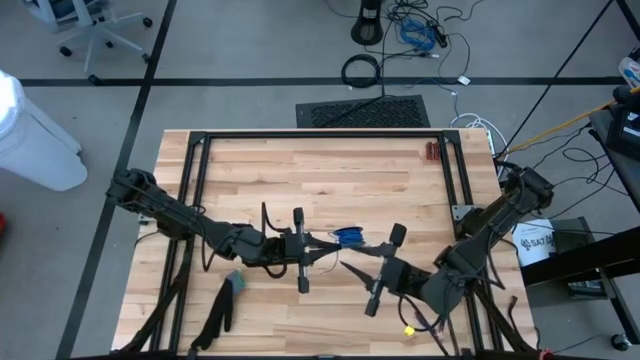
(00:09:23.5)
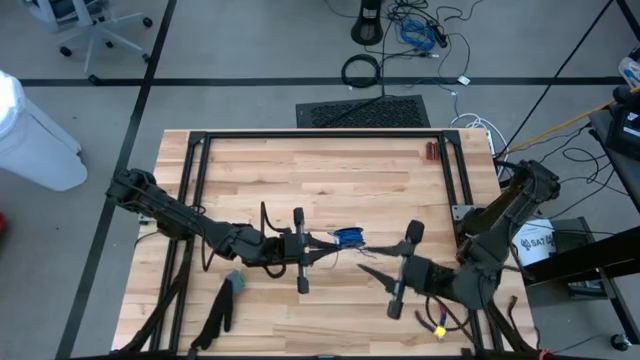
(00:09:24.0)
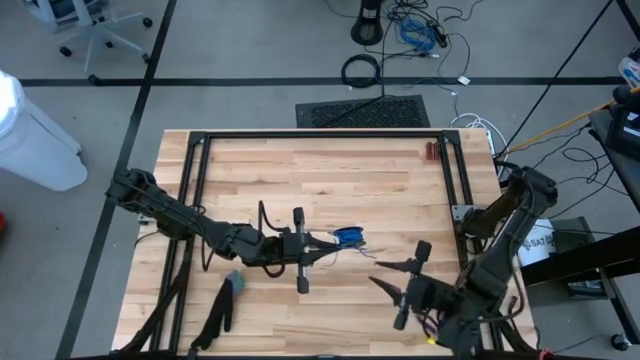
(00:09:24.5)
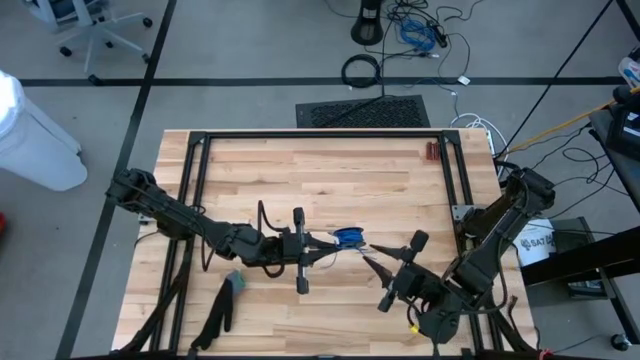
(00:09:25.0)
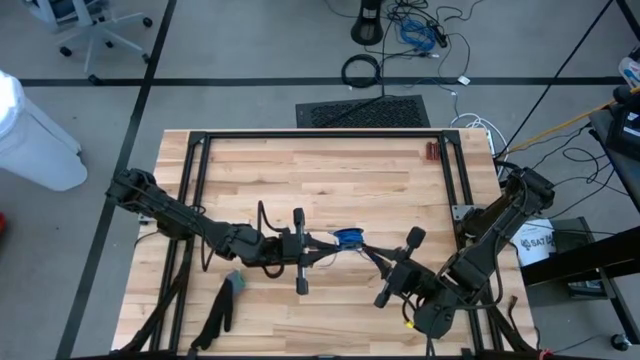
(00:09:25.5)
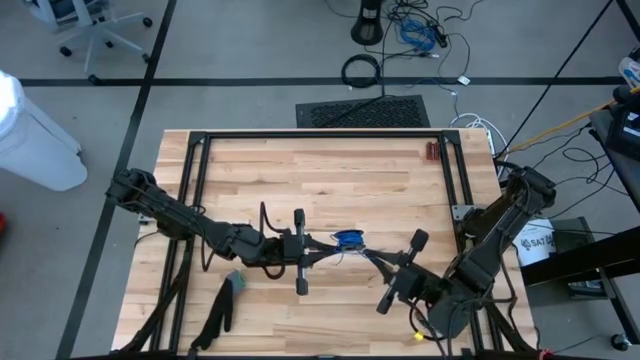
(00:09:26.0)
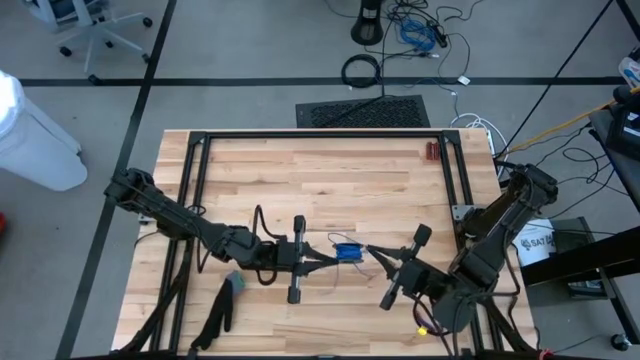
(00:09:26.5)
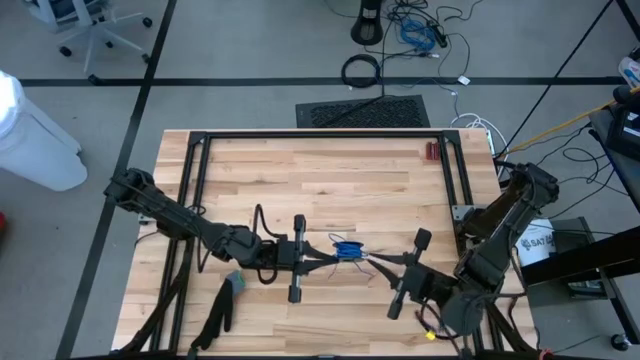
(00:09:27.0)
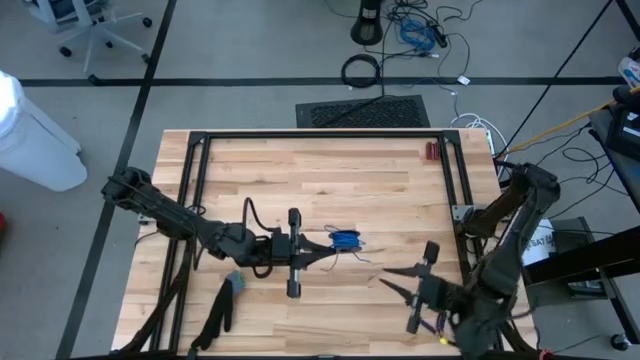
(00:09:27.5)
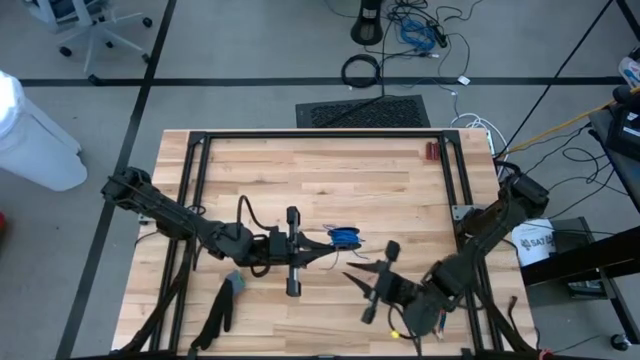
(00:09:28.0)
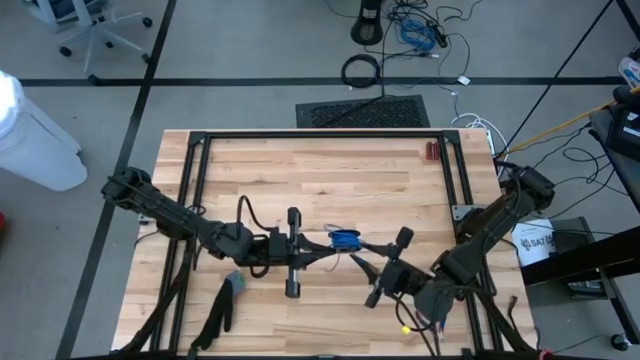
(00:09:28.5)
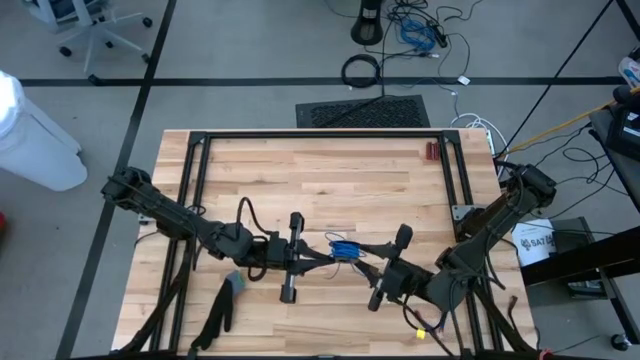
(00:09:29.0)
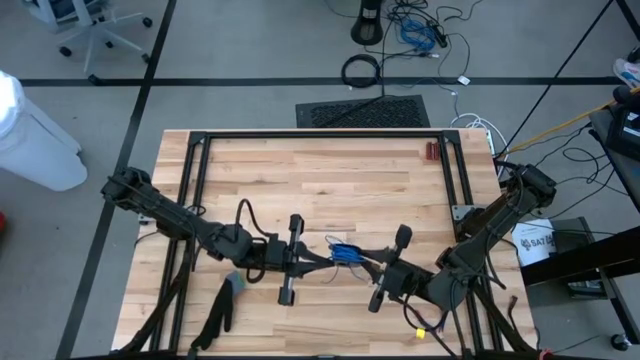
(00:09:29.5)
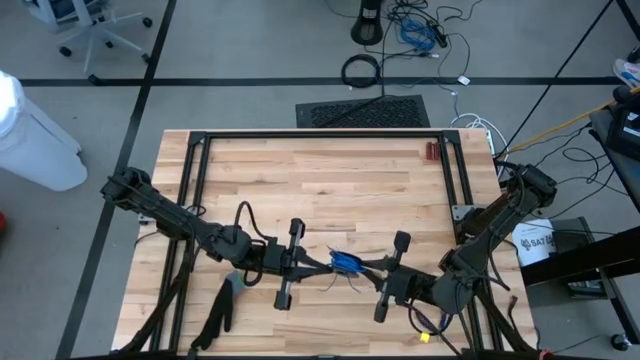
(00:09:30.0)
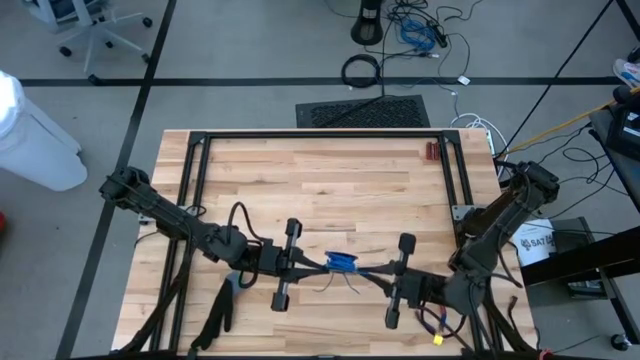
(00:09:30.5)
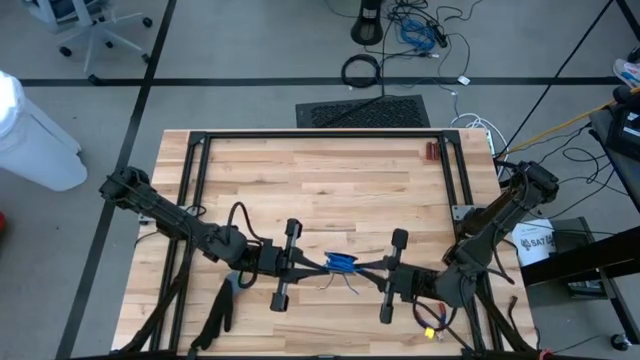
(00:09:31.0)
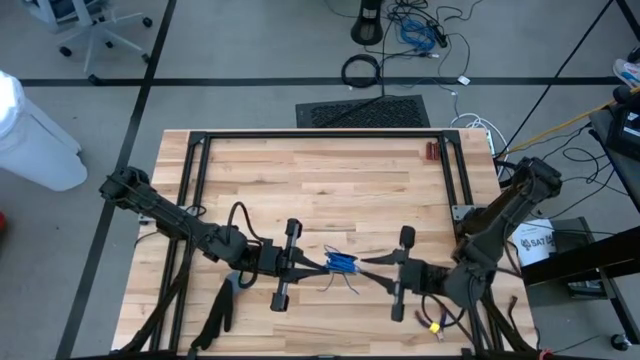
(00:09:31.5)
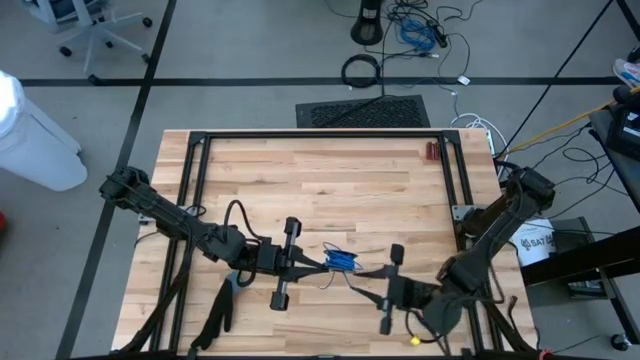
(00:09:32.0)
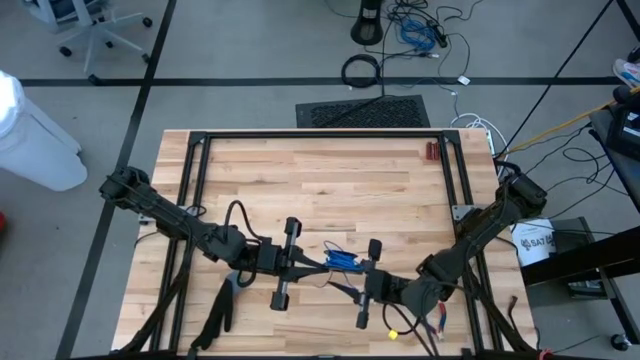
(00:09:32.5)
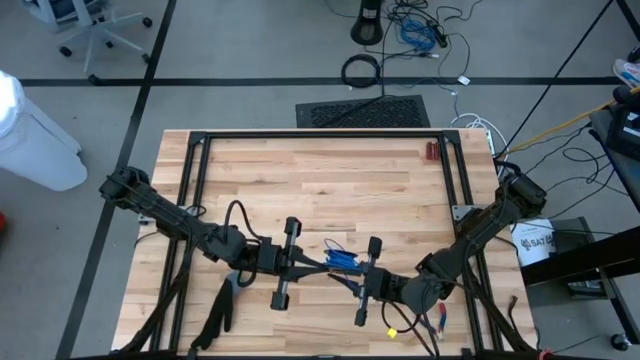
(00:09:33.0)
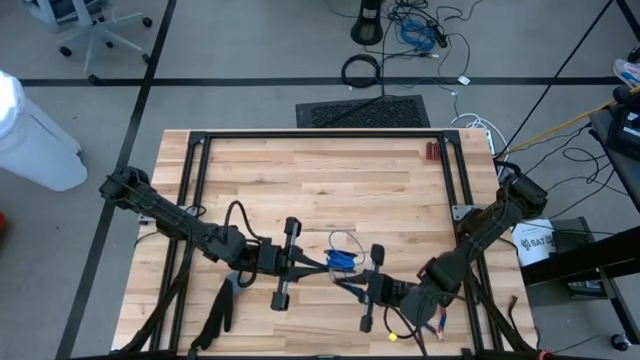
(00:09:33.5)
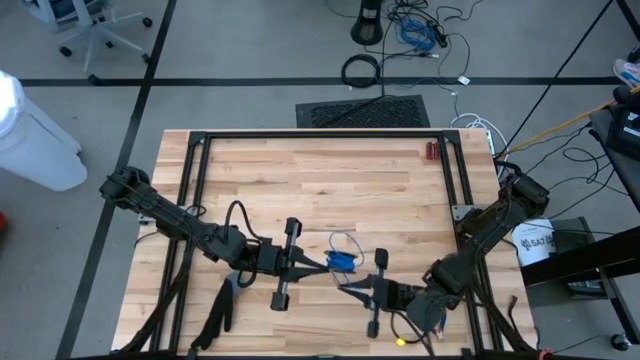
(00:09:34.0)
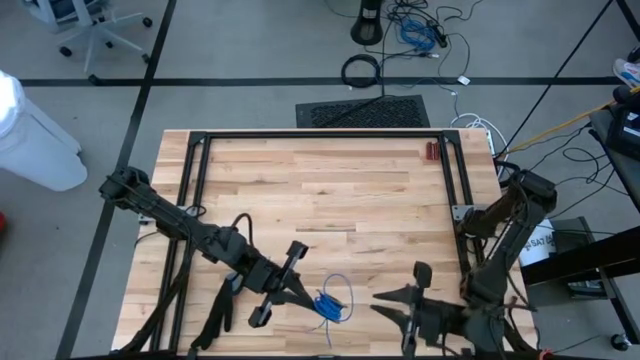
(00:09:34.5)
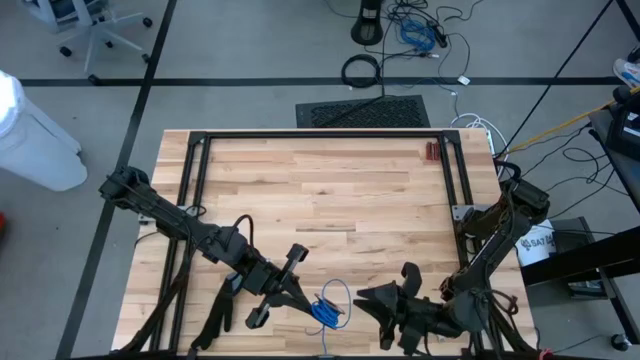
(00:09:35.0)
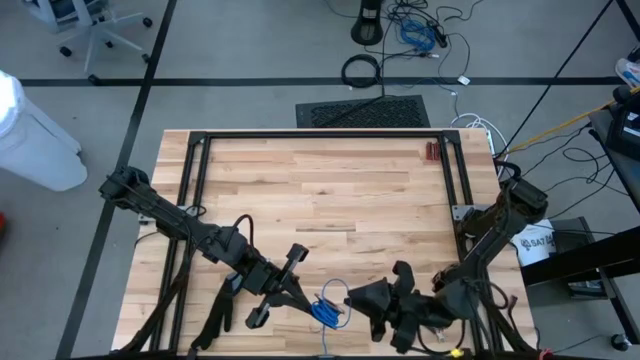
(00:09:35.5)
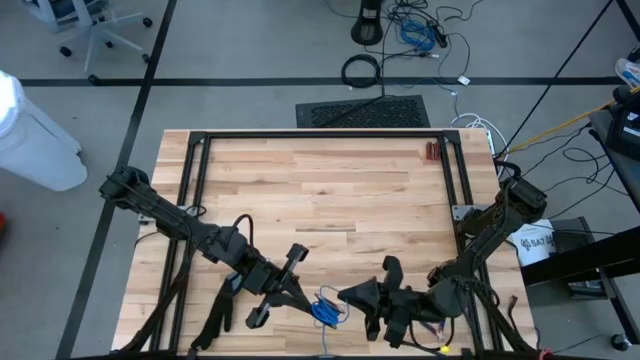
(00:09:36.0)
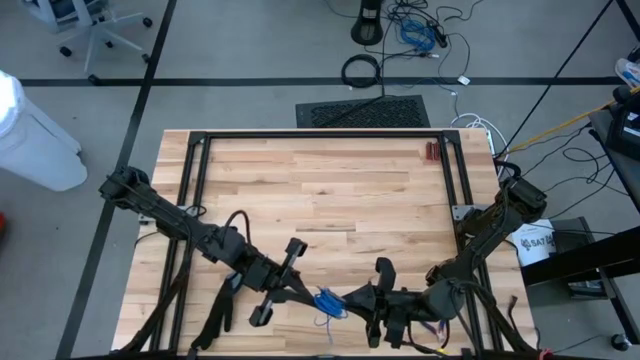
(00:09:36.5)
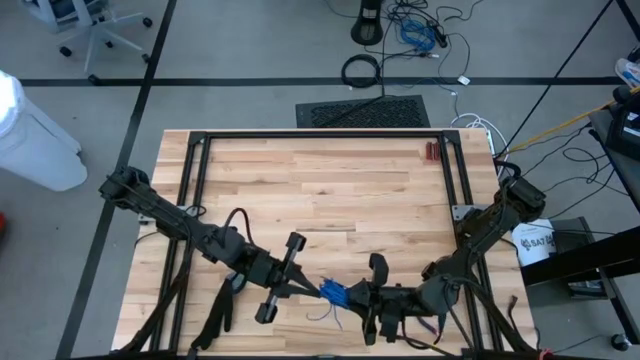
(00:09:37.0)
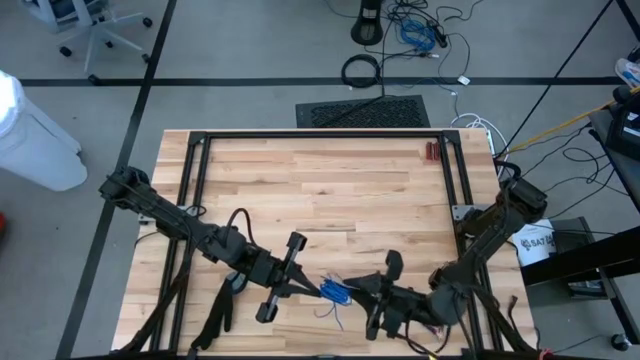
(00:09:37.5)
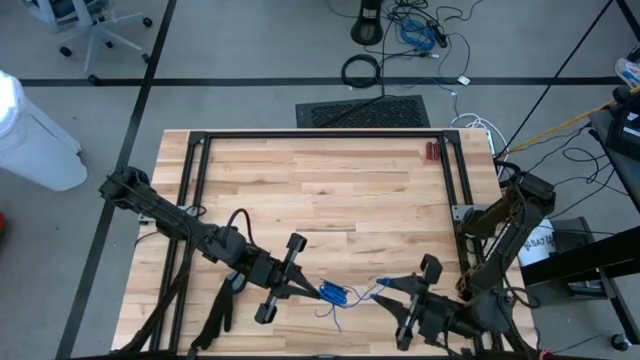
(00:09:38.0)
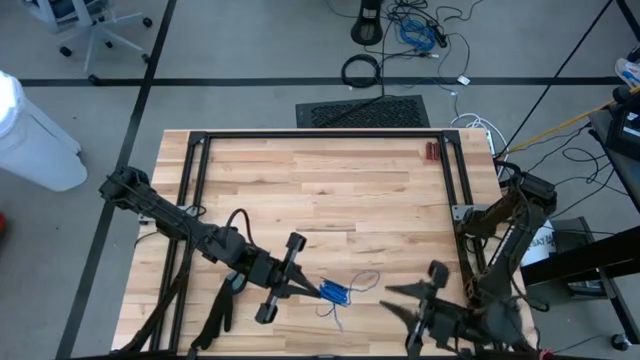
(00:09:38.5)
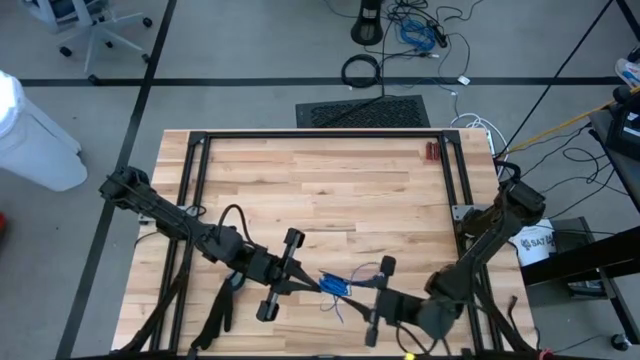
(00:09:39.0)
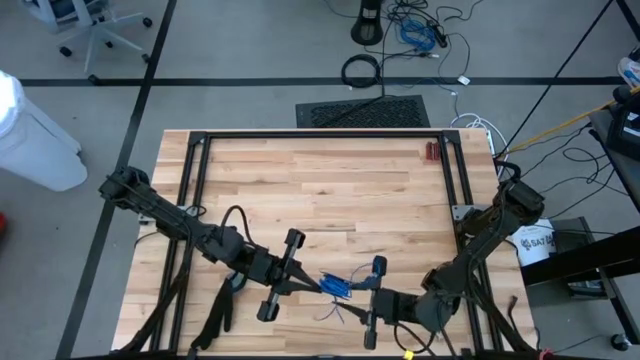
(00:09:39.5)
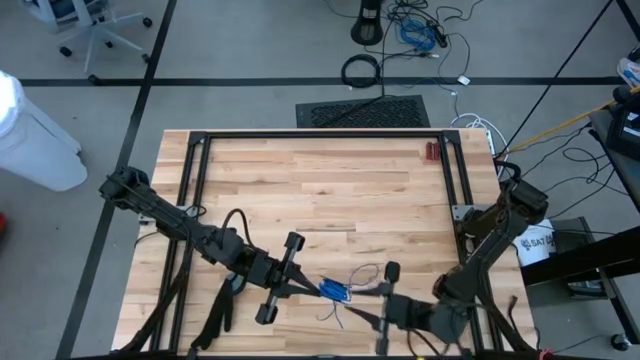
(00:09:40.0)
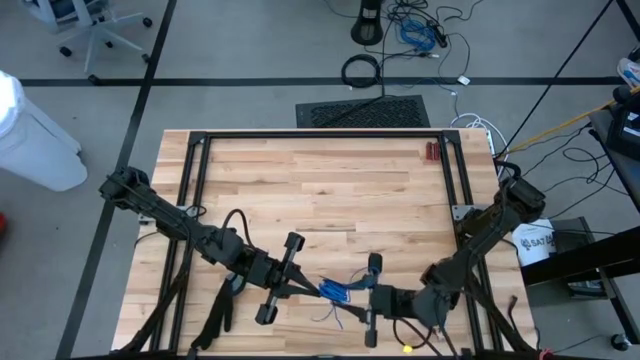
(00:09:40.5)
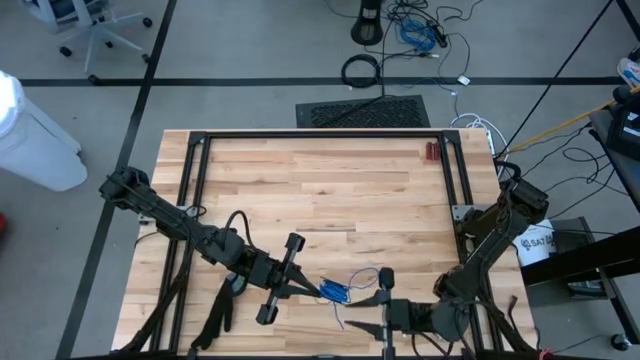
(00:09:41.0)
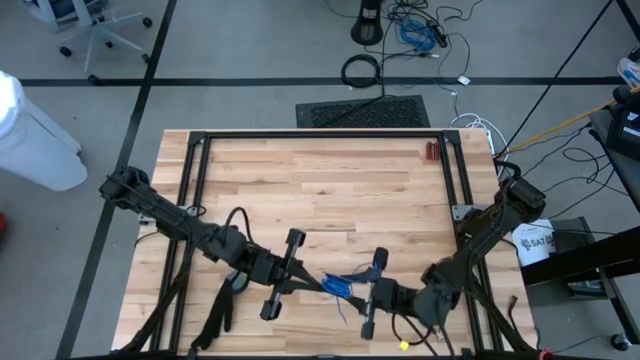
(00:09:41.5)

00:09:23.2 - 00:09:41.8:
Task: Coil cords
Coil the blue wire onto the black spool

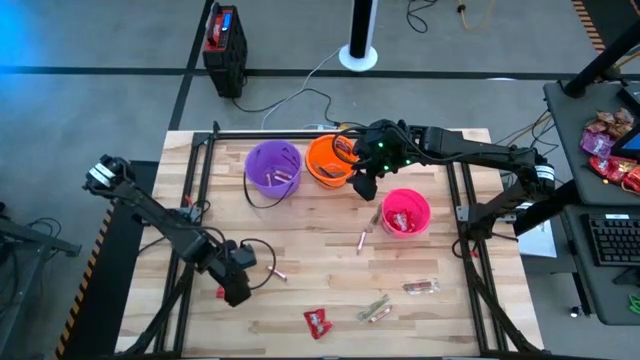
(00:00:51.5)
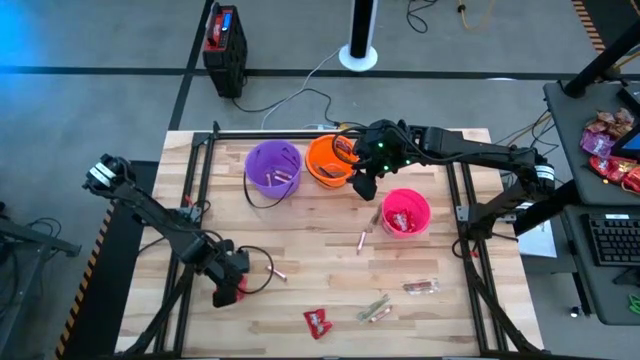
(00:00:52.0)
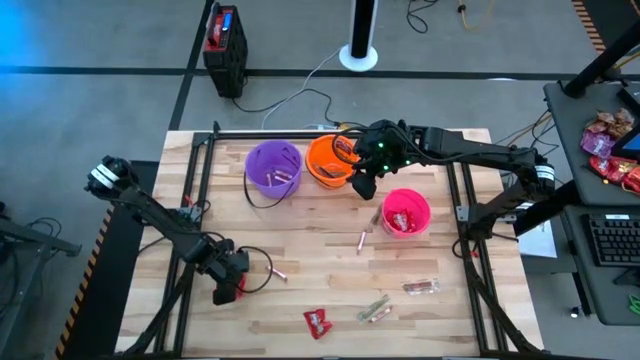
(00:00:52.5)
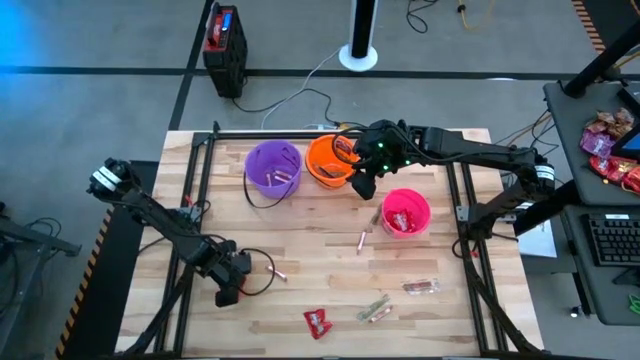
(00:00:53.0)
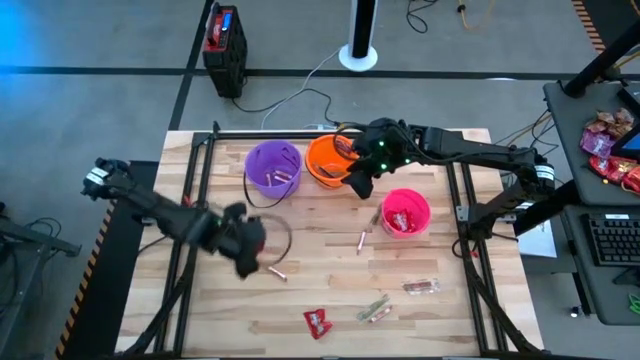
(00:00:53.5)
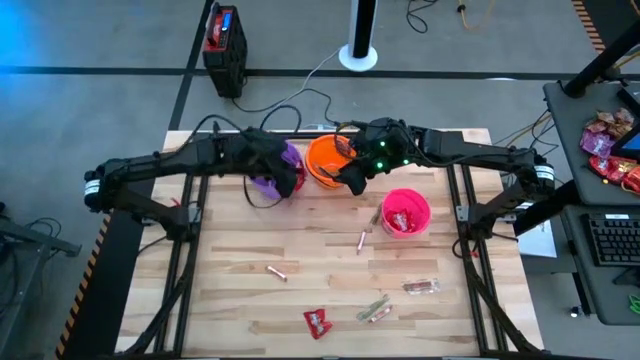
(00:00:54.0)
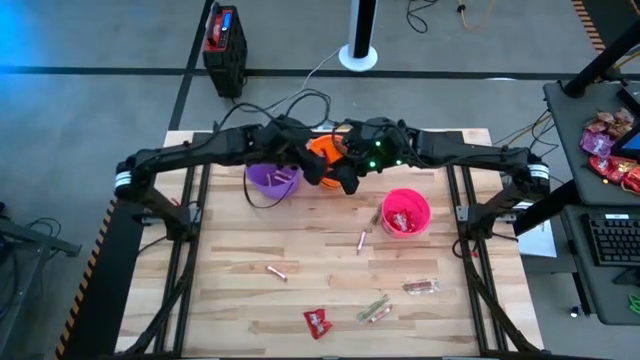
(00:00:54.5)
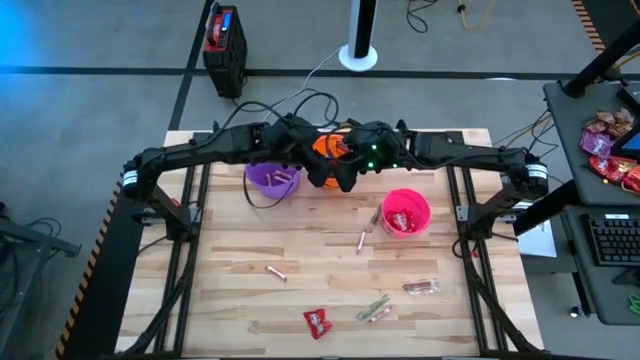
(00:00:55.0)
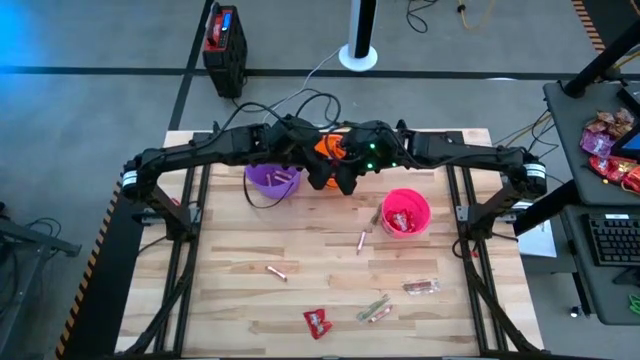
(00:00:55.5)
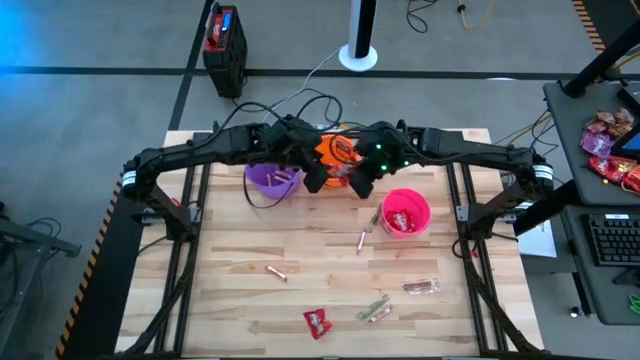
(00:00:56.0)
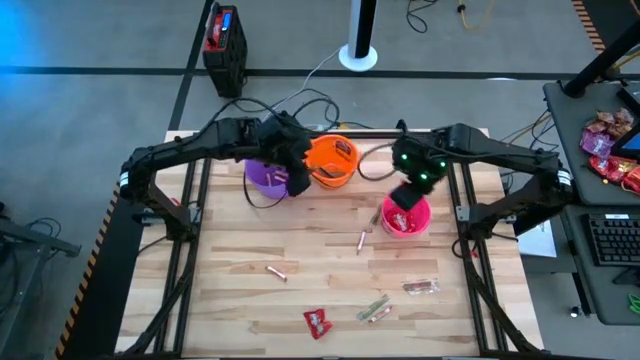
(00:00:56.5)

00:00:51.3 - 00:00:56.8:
Task: Sort candy by brand, put in halloween buckets
Put the red candy into the pink bucket
